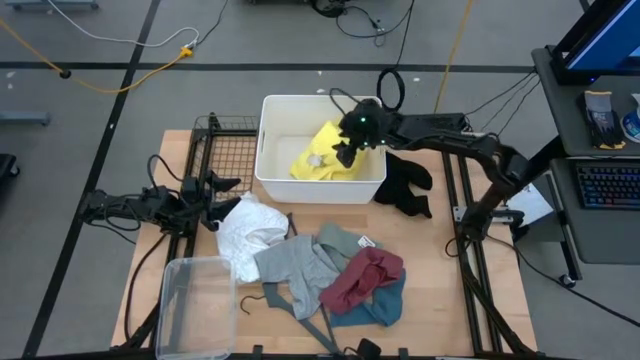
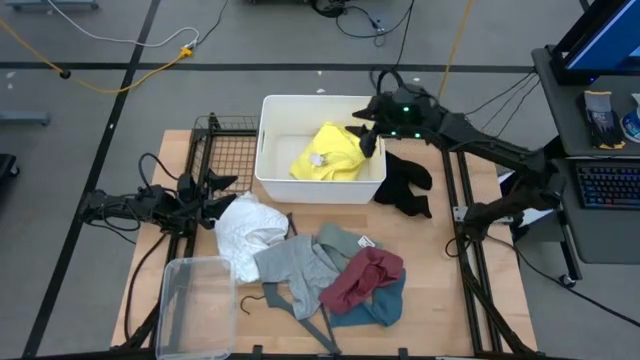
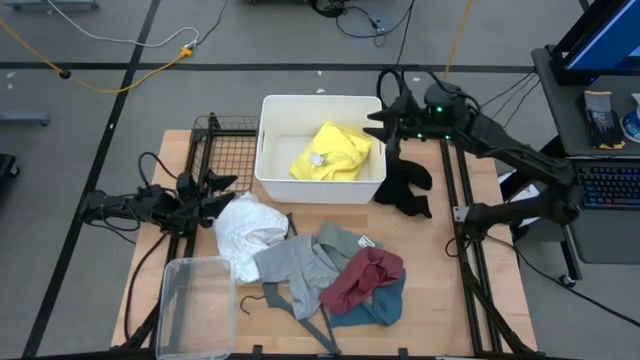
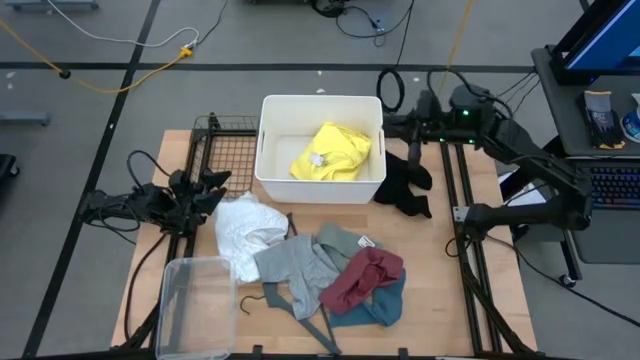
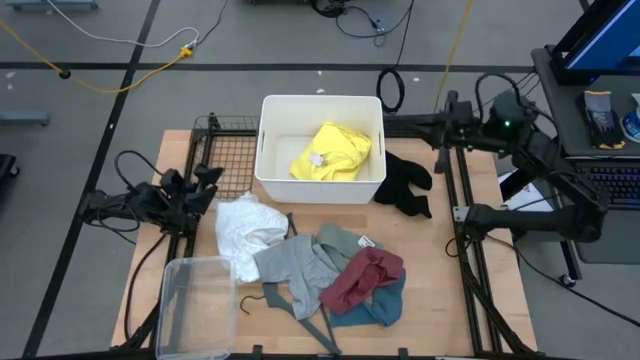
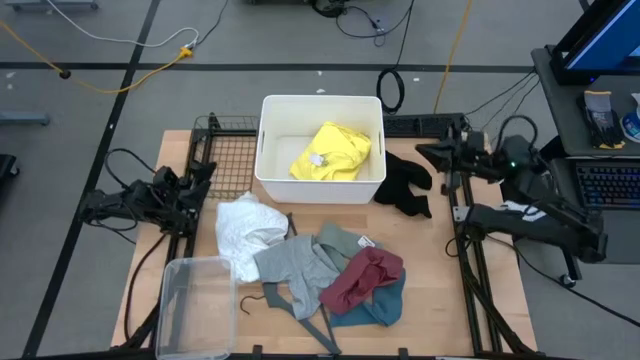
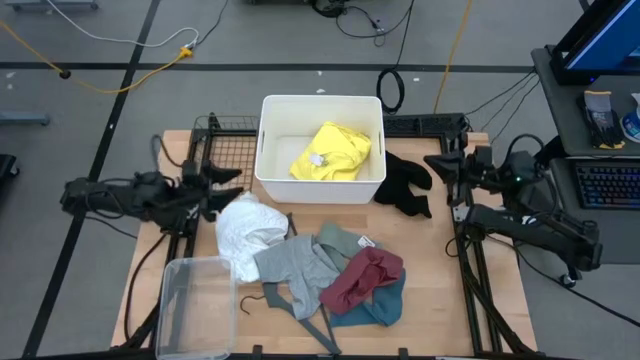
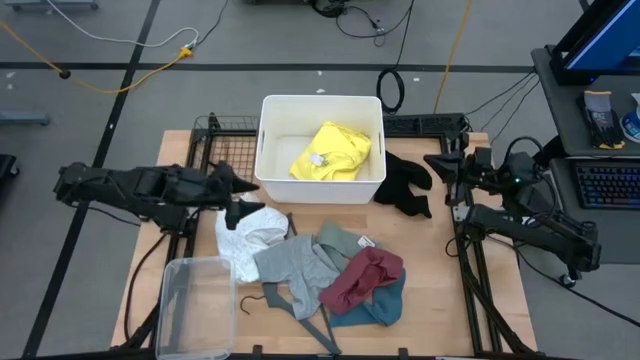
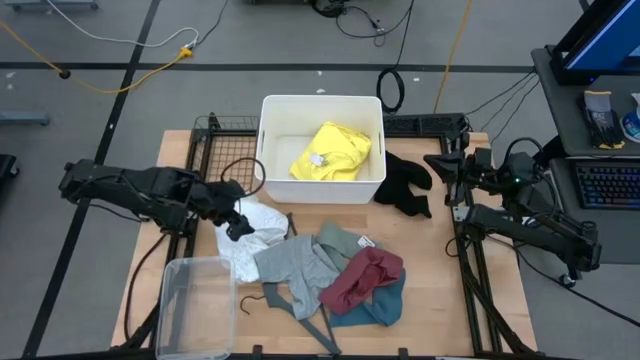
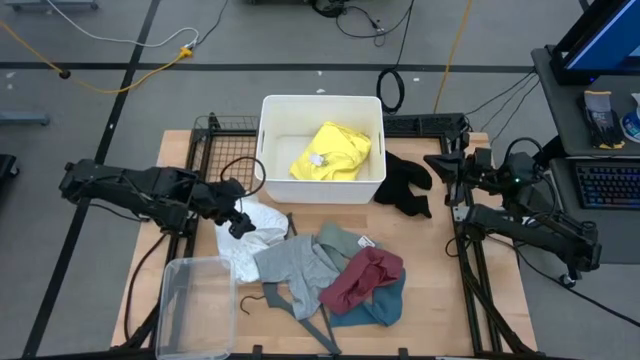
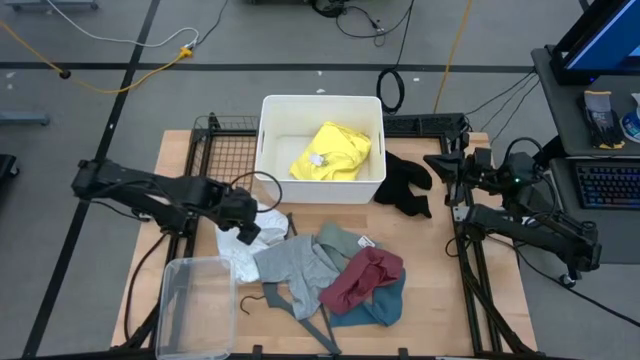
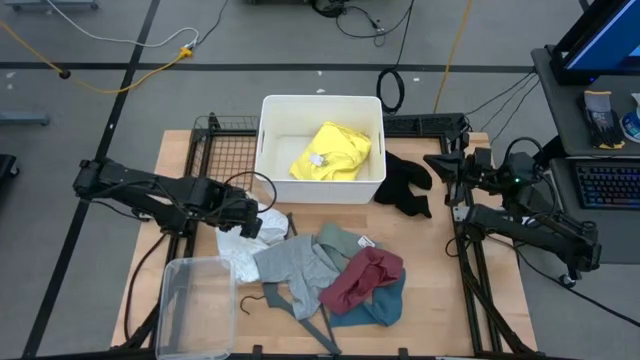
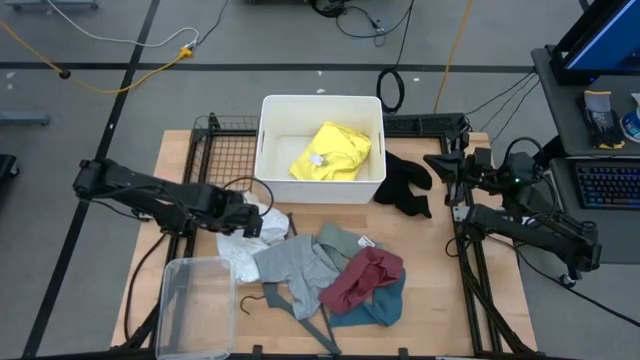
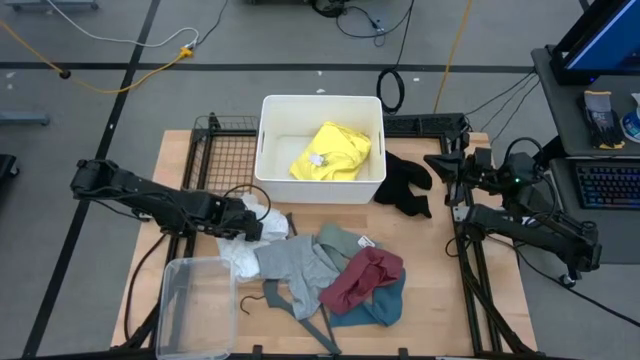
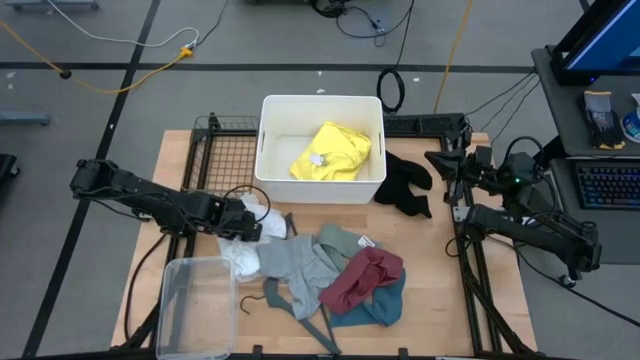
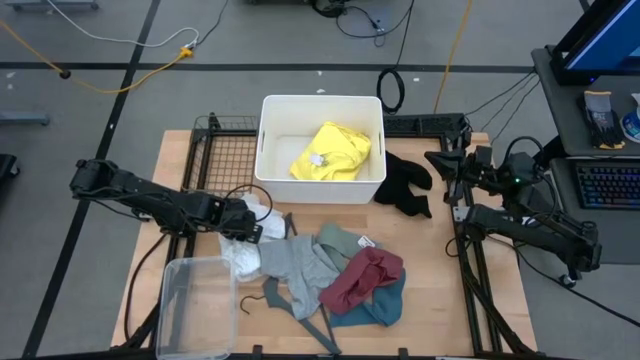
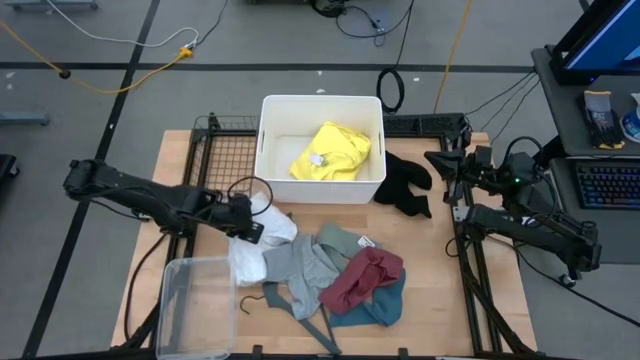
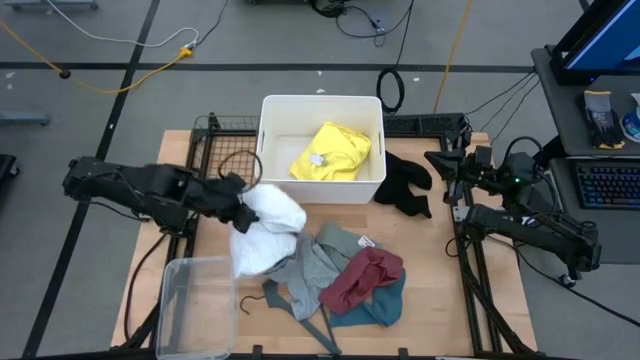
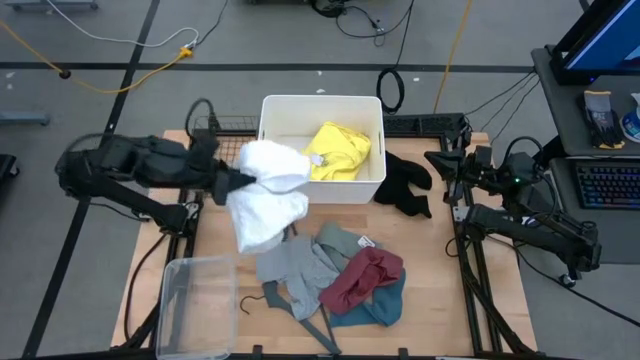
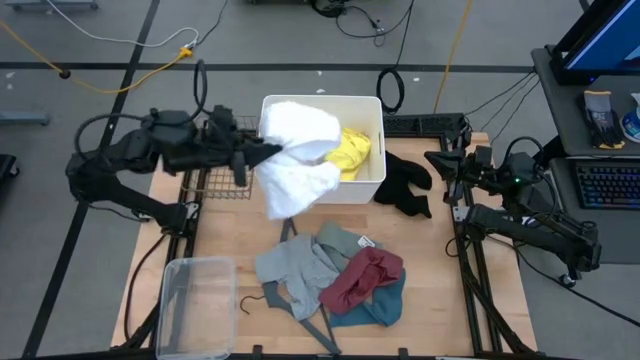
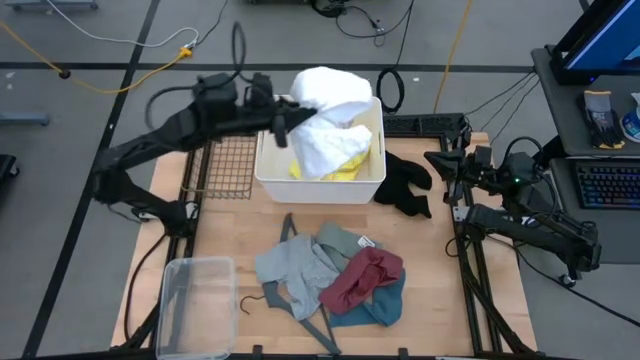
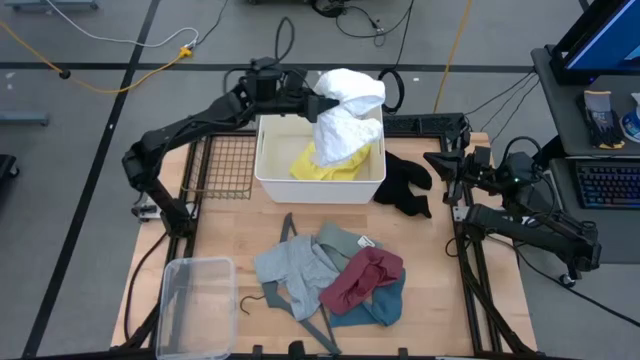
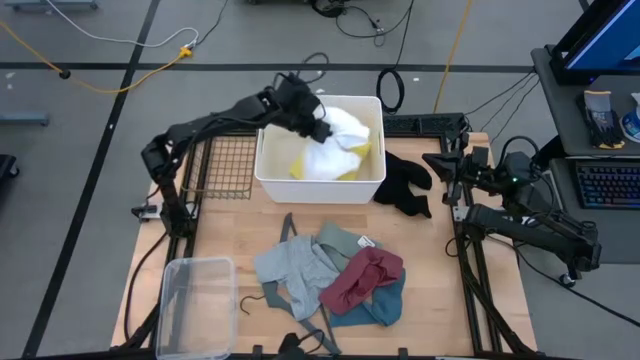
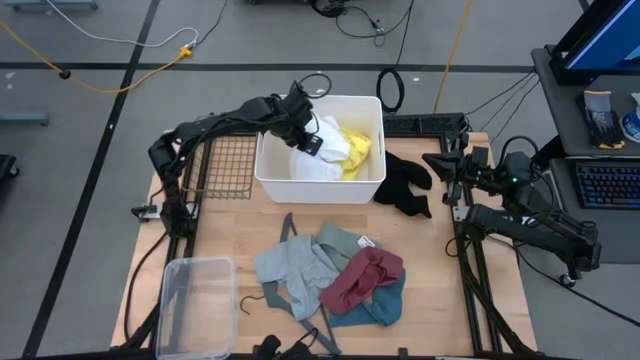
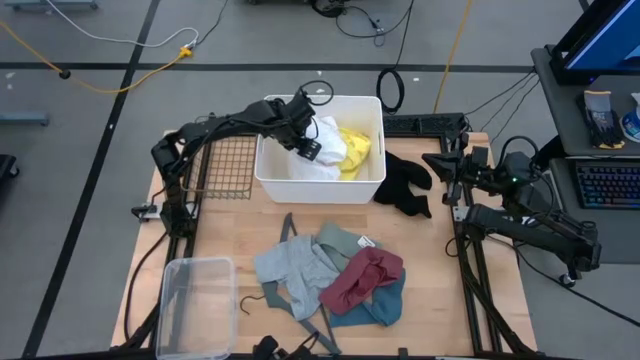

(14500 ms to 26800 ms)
Task: Pick & Place Cloths
Put the white shirt into the white bin

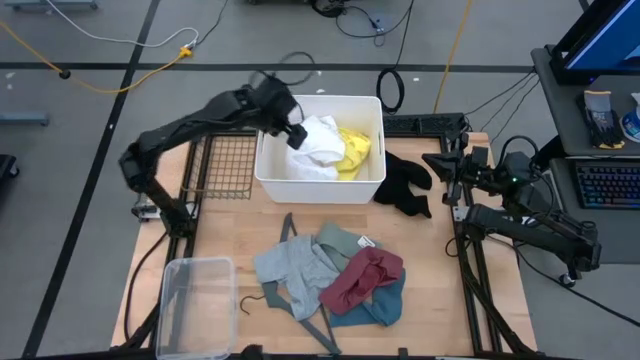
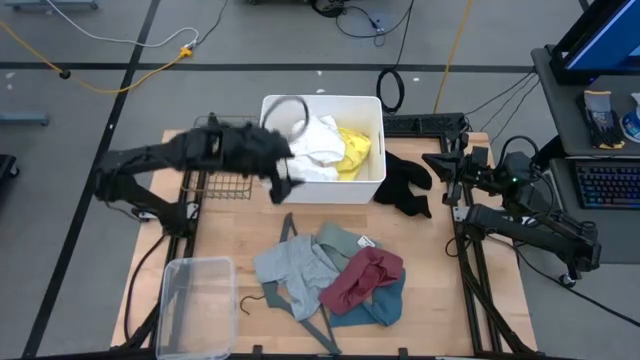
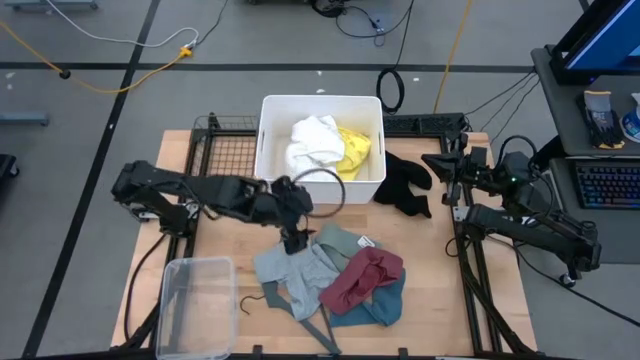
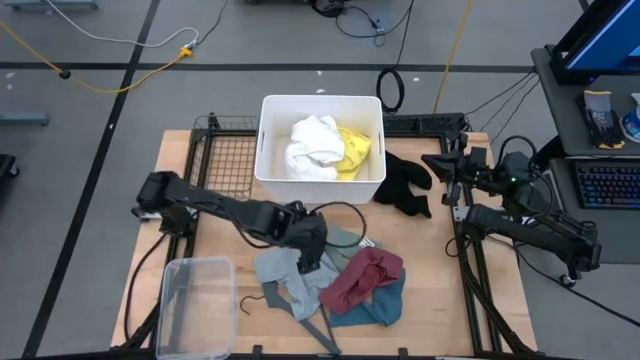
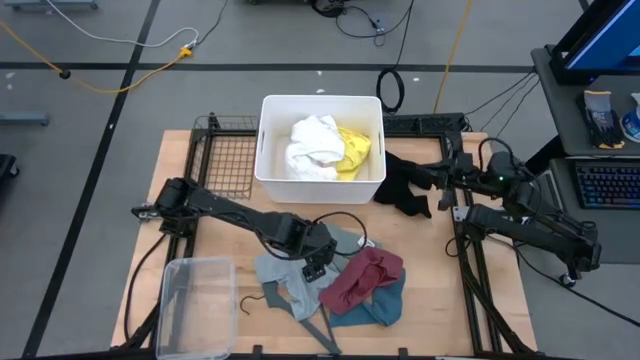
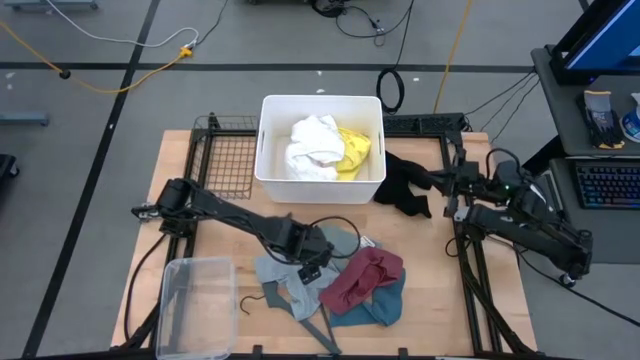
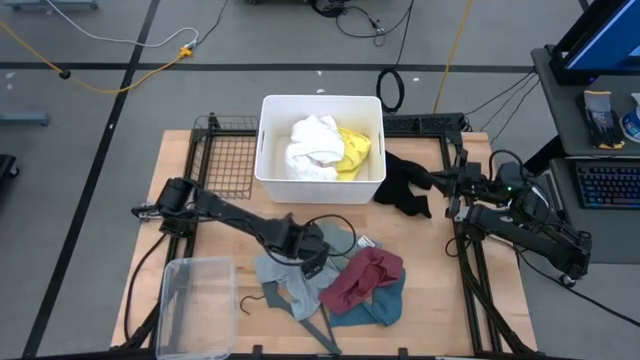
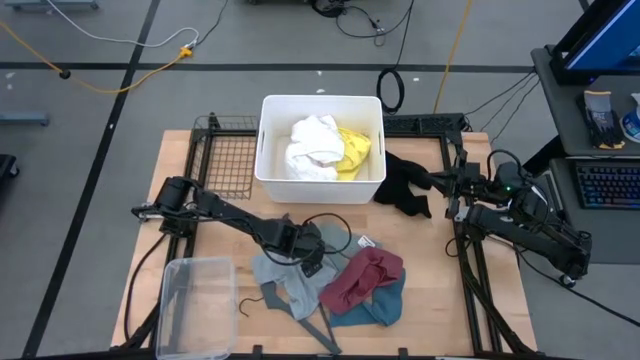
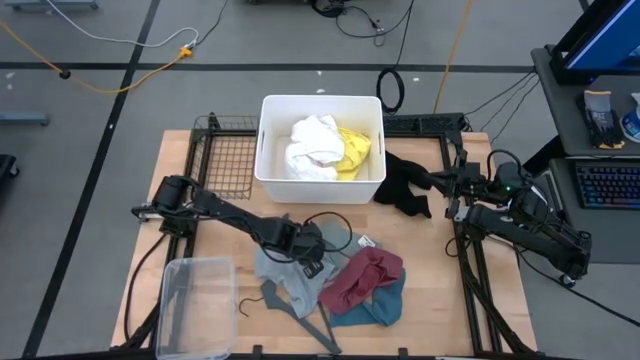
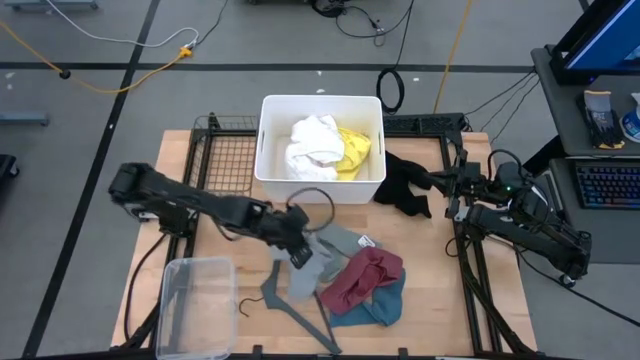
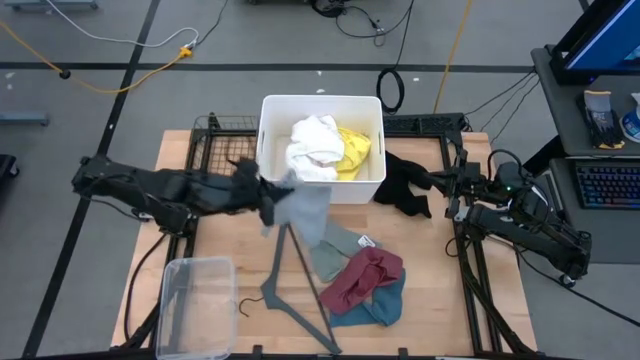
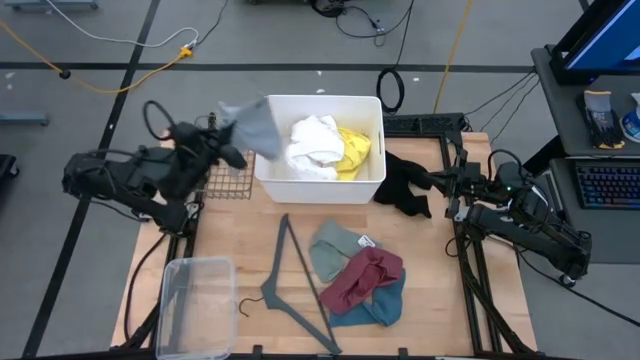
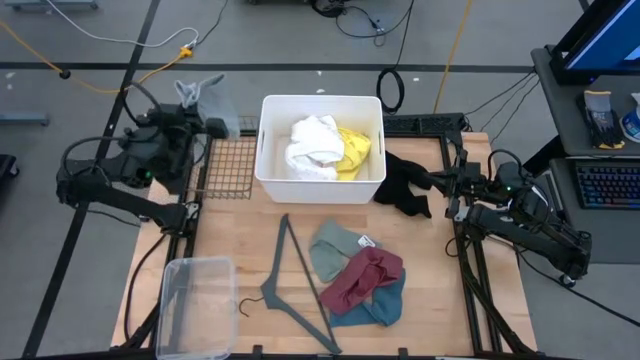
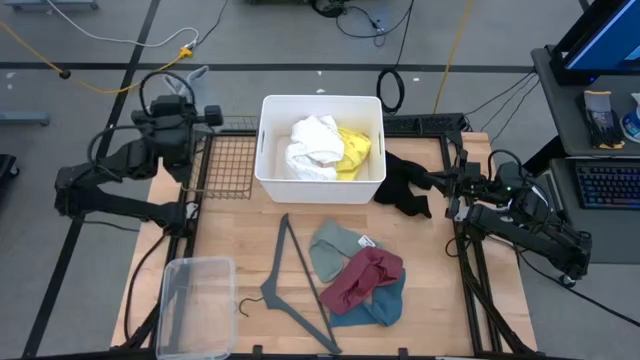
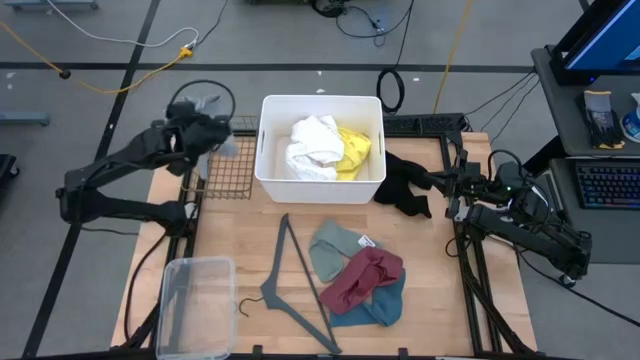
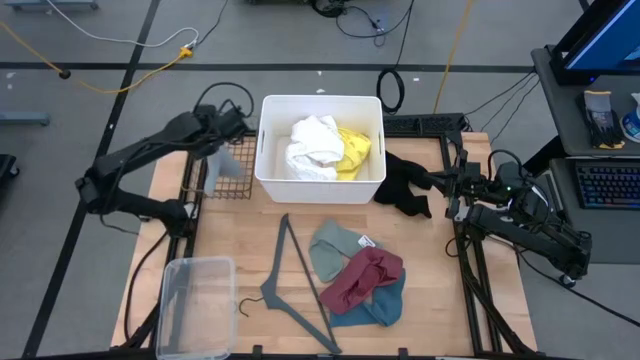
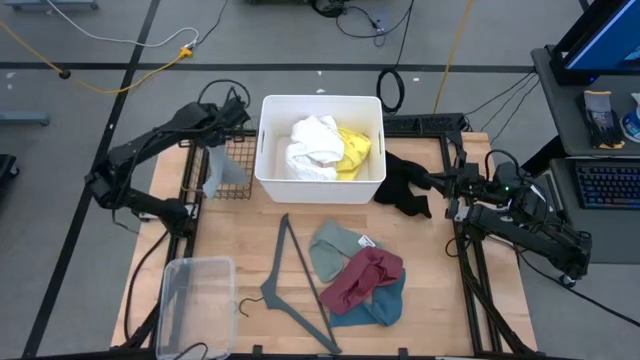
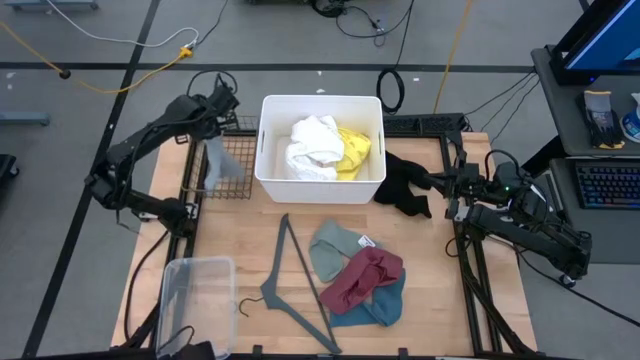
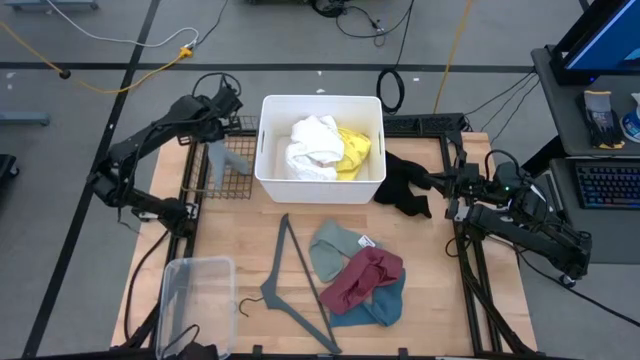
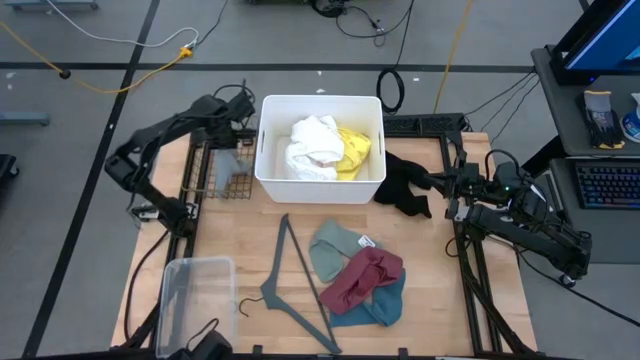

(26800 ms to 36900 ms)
Put the gray pants into the gold wire basket

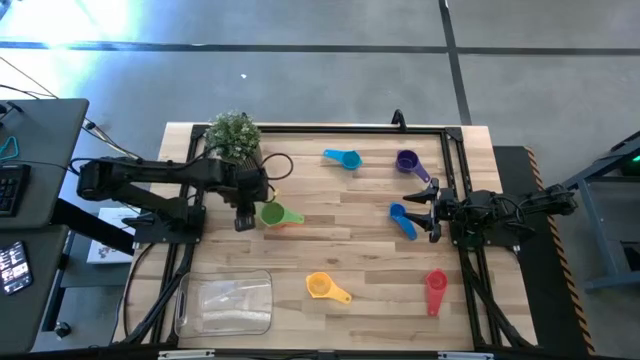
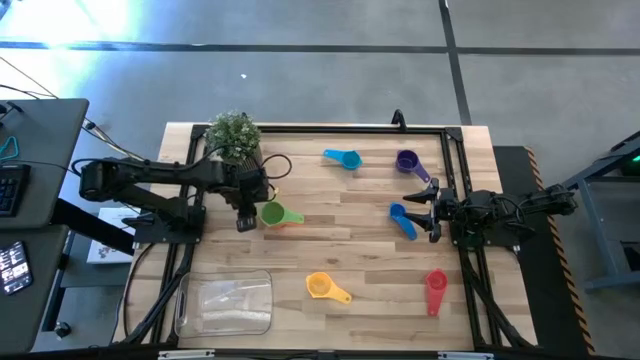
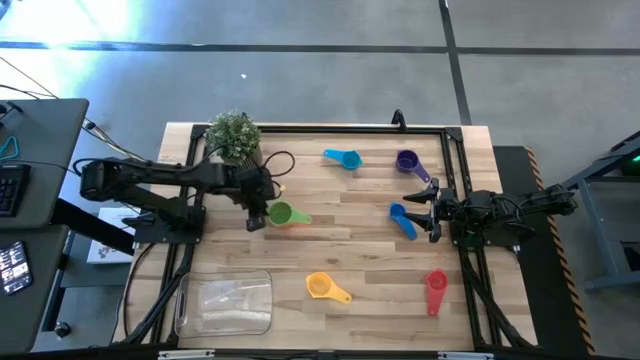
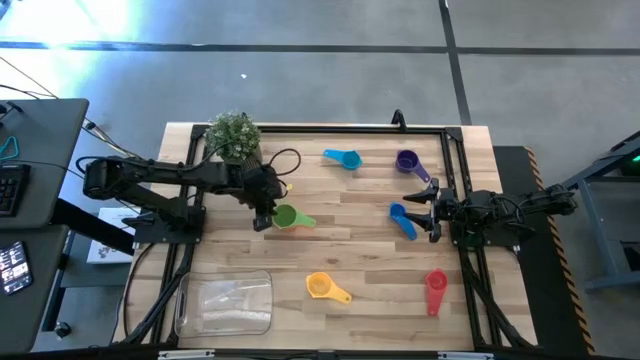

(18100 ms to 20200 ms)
Task: Nest measuring cups in basket
Adjust the stacked measuring cups
